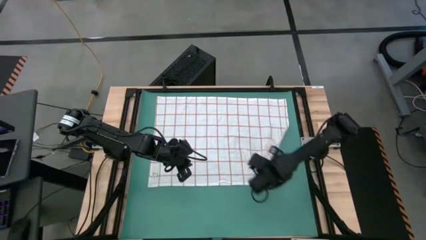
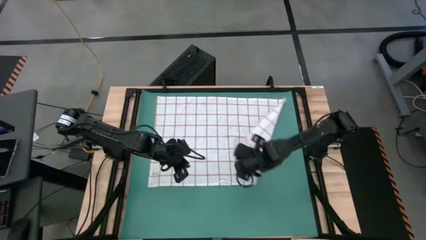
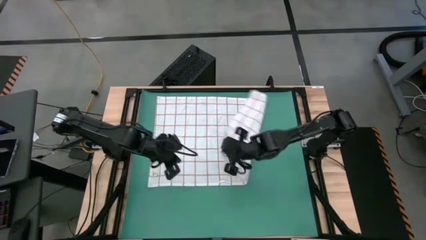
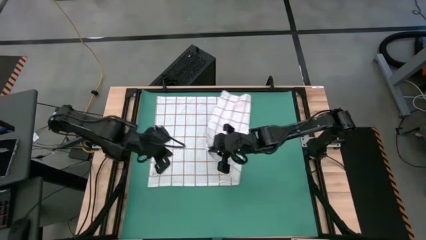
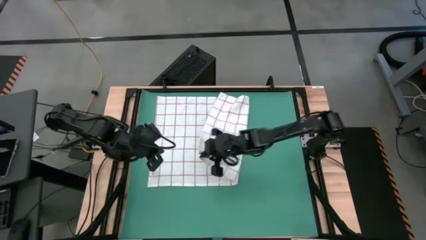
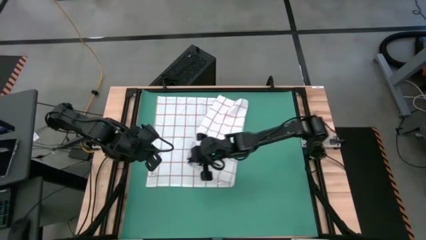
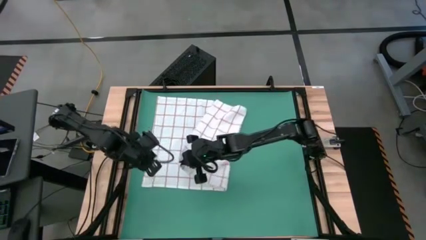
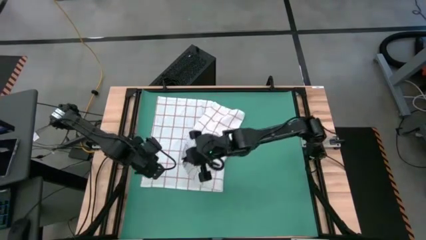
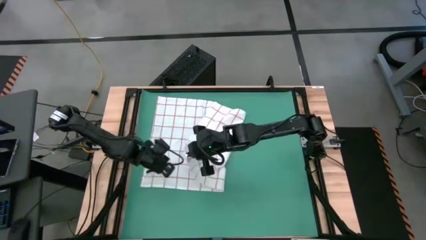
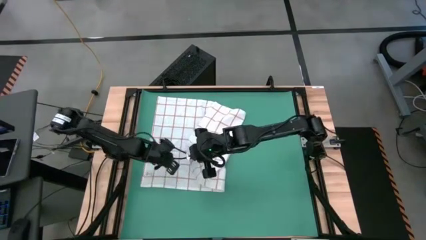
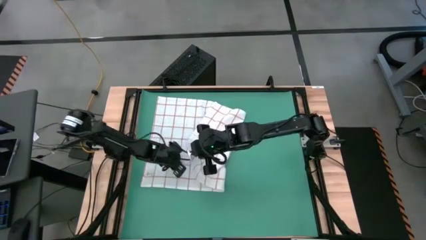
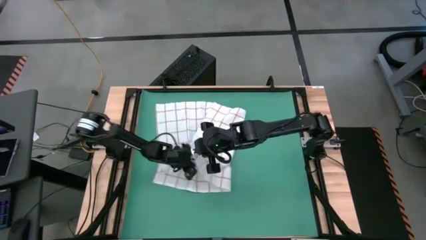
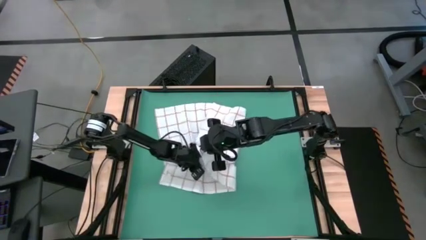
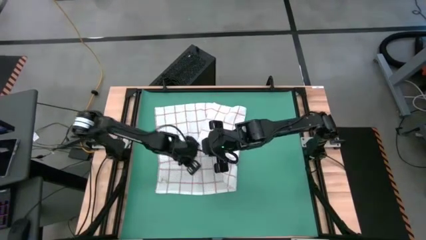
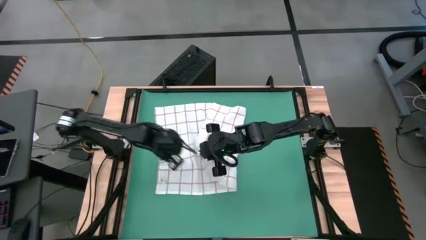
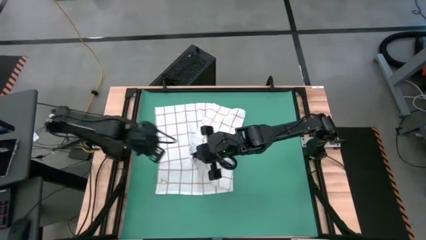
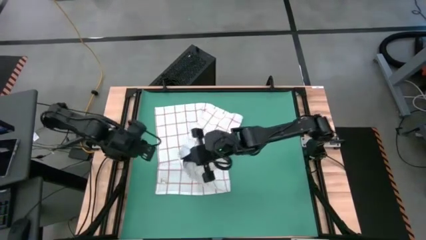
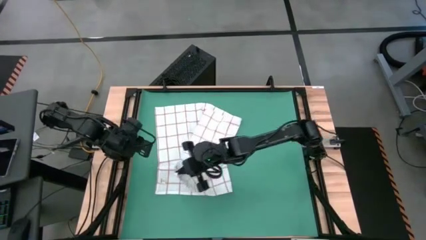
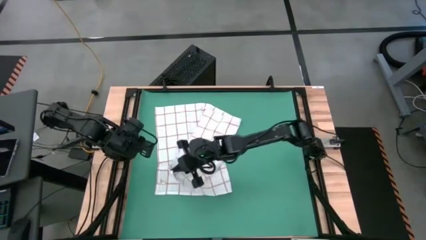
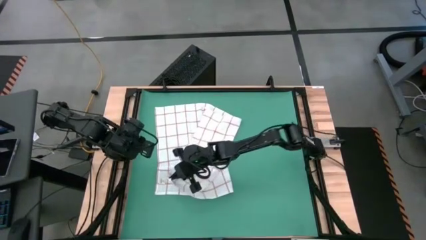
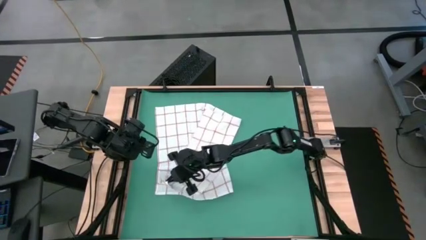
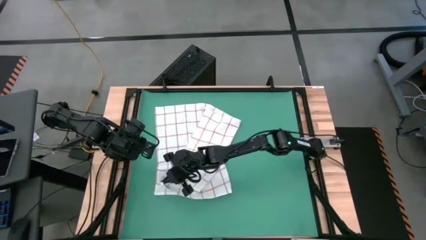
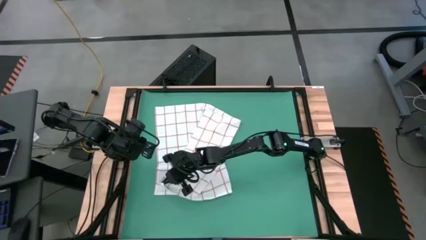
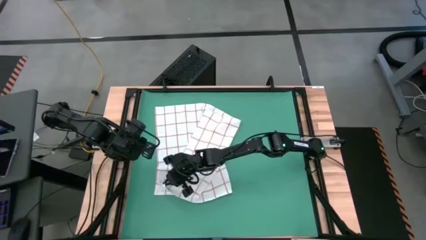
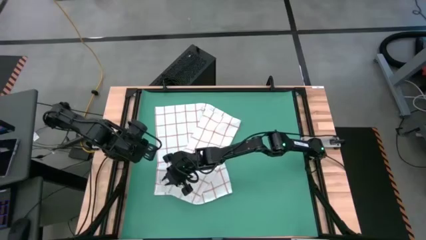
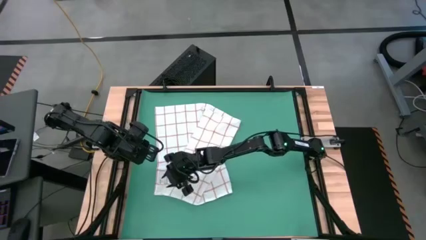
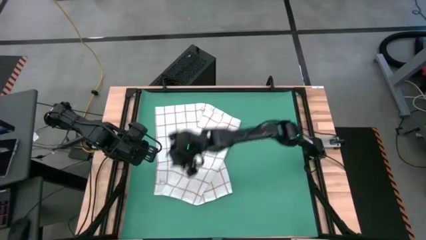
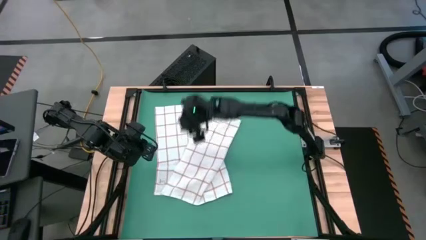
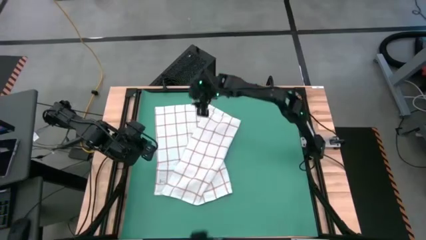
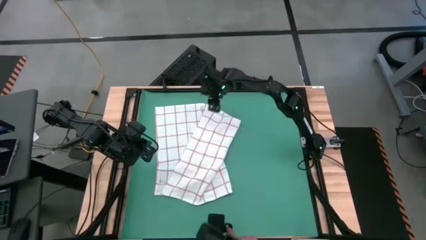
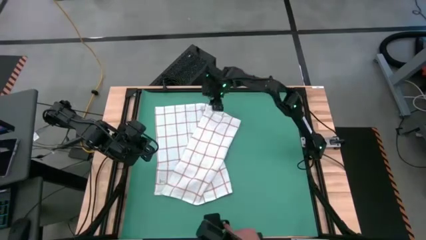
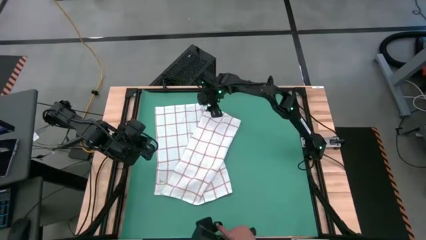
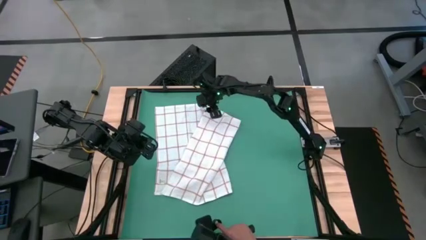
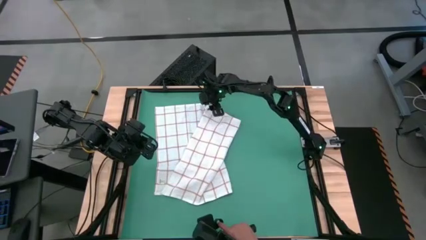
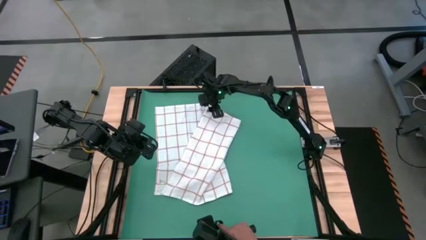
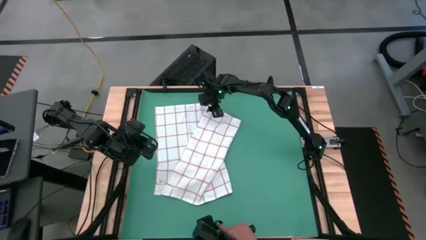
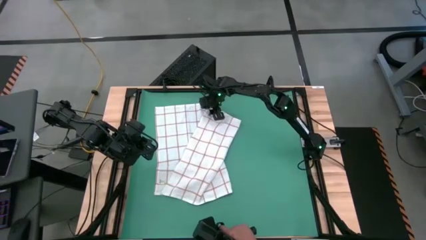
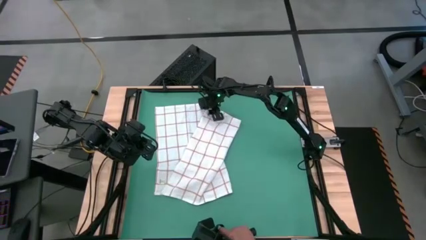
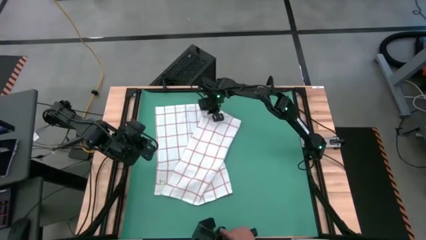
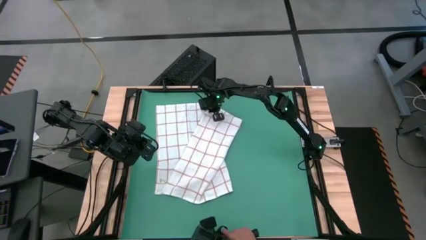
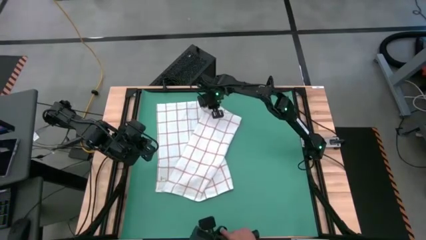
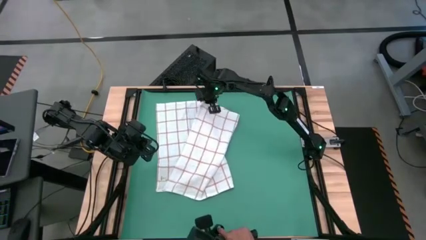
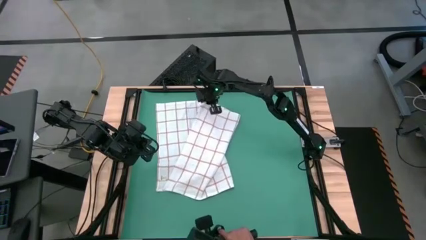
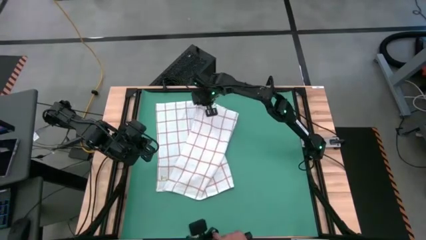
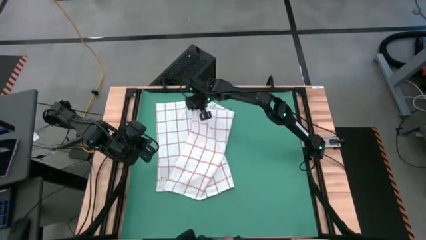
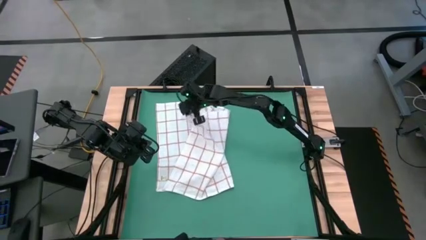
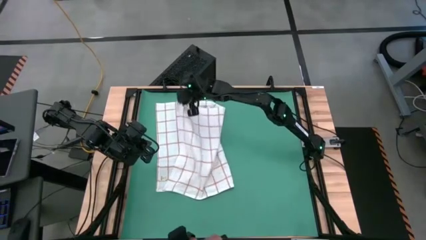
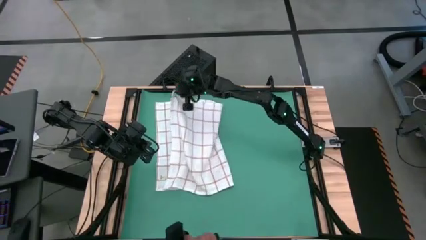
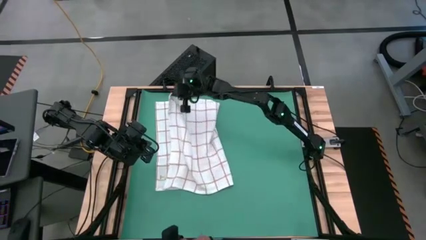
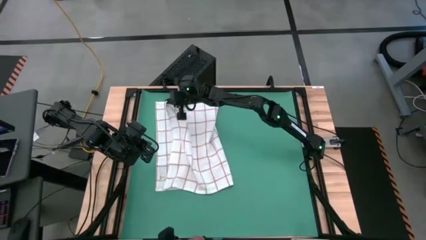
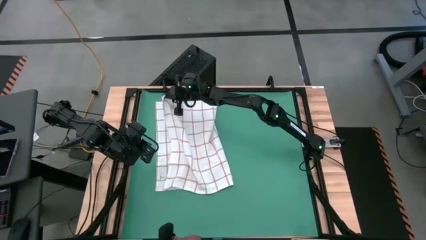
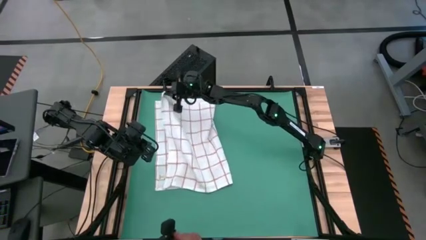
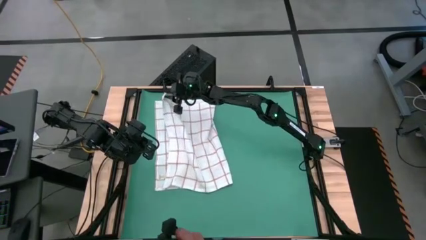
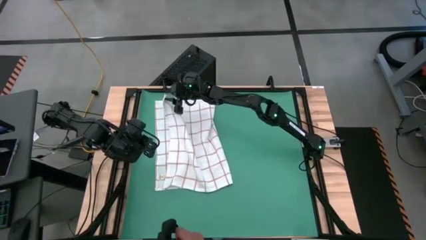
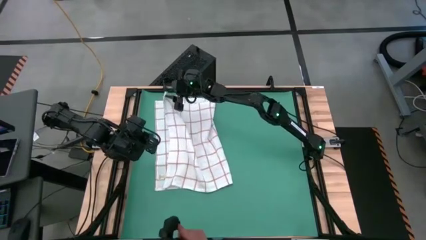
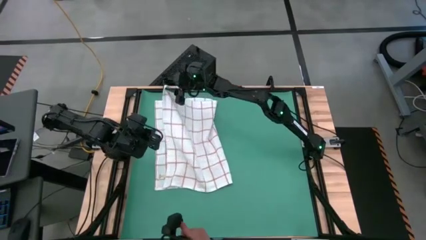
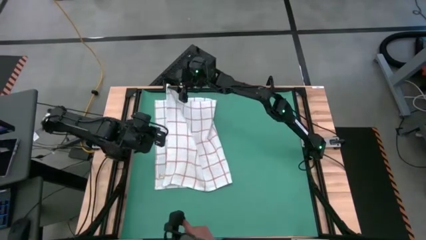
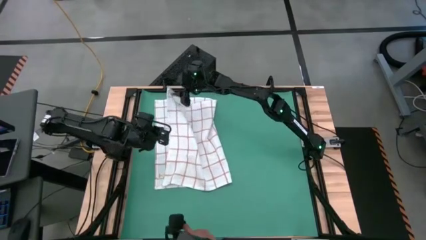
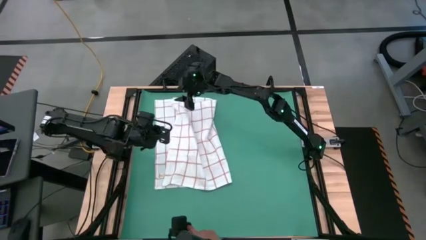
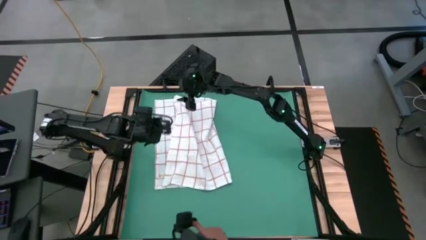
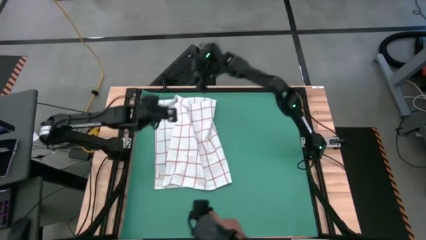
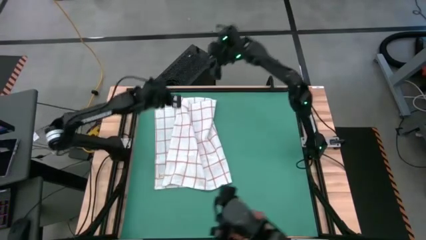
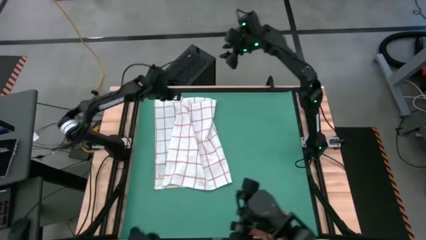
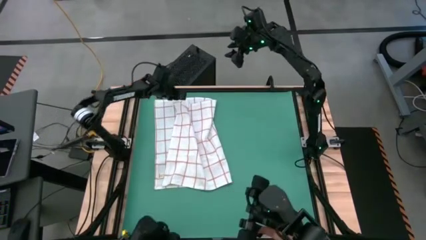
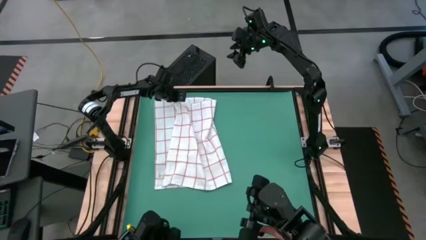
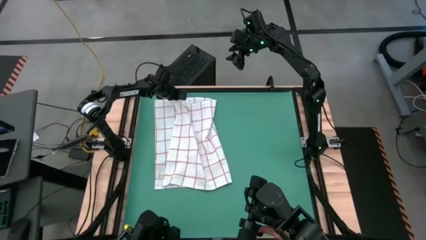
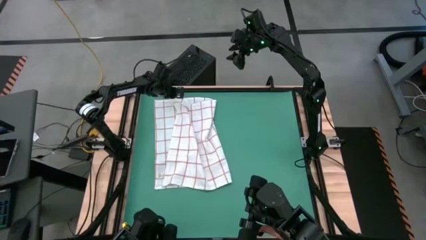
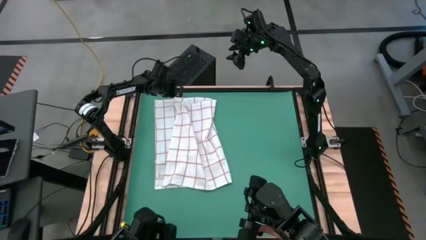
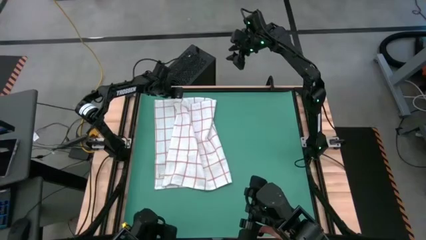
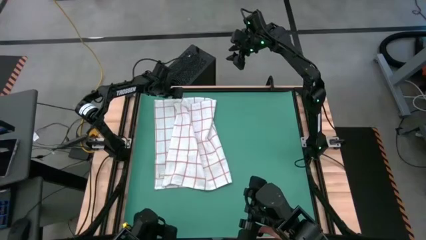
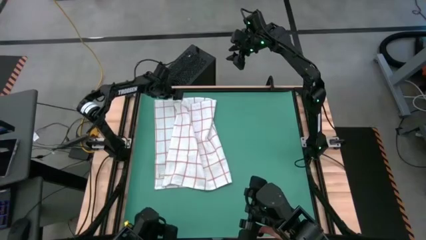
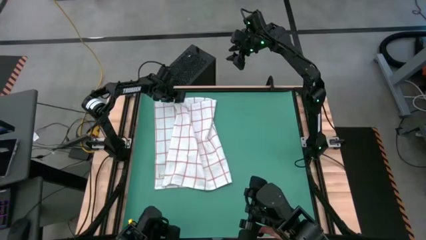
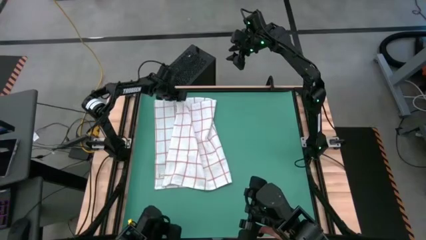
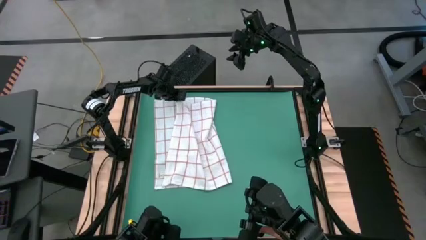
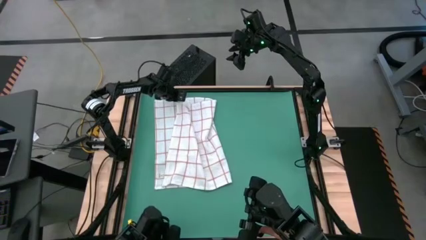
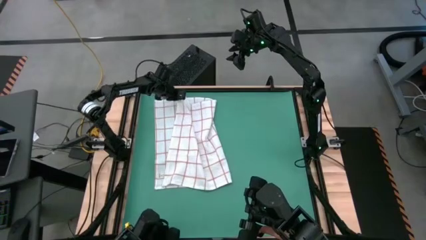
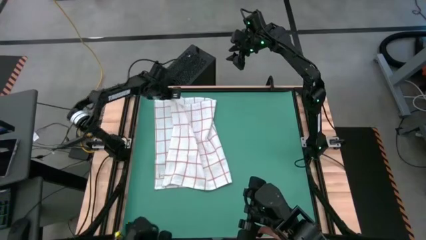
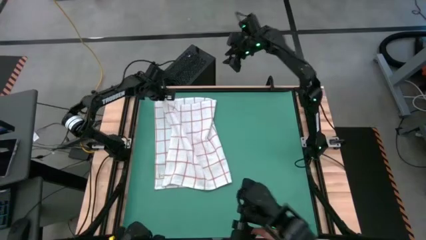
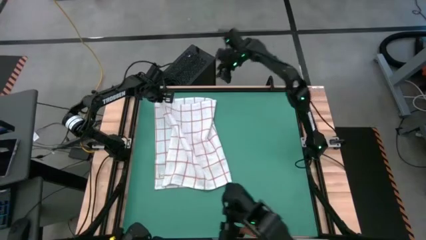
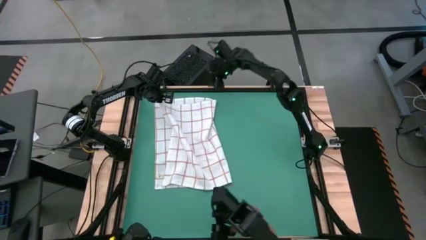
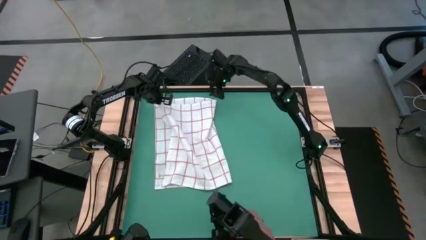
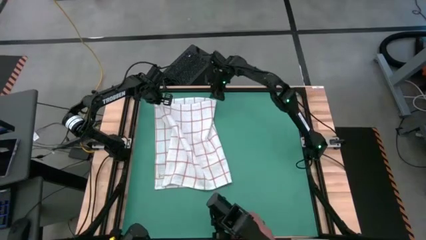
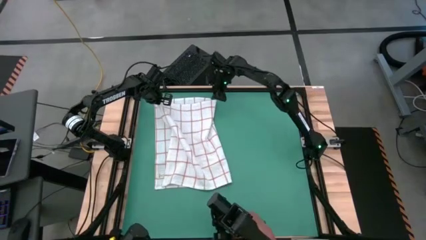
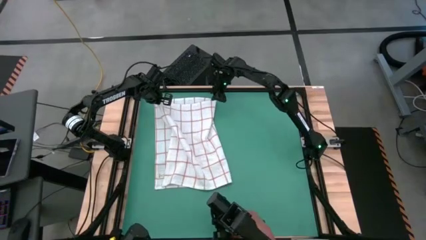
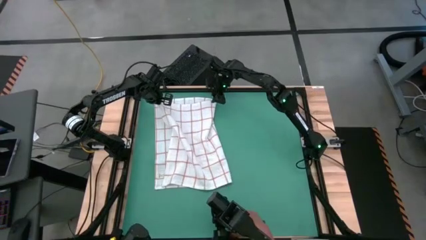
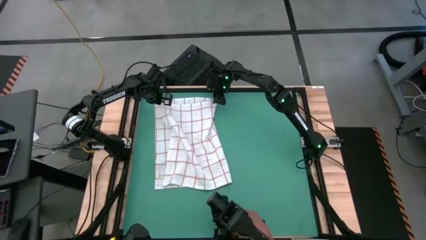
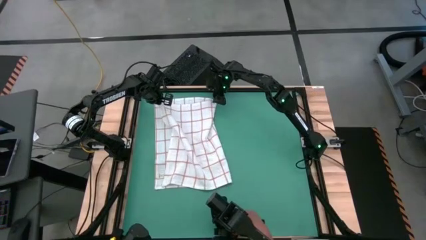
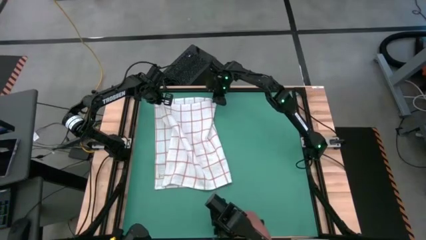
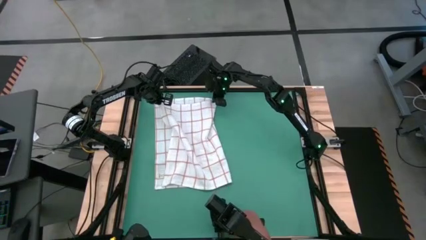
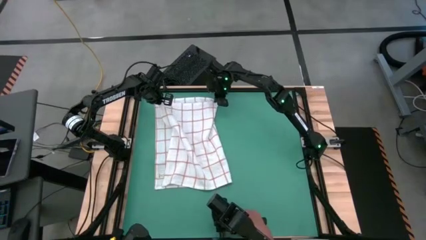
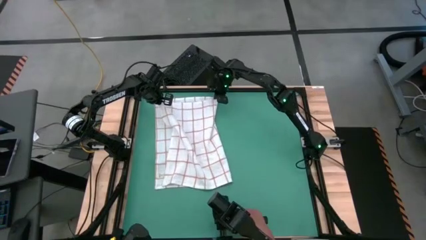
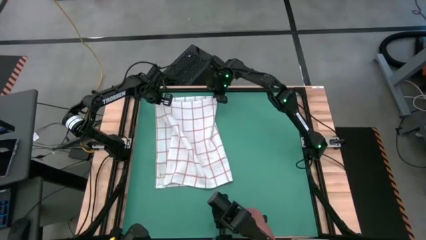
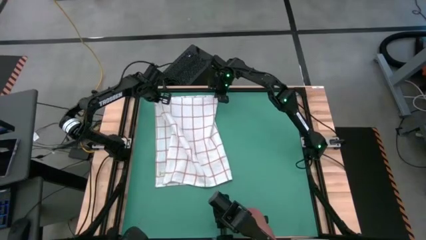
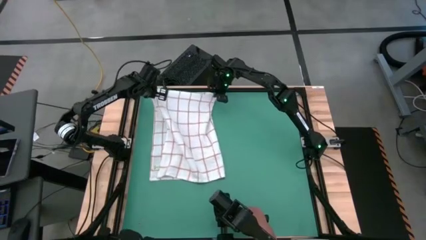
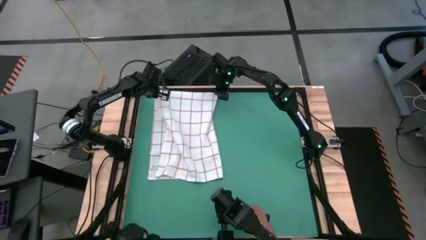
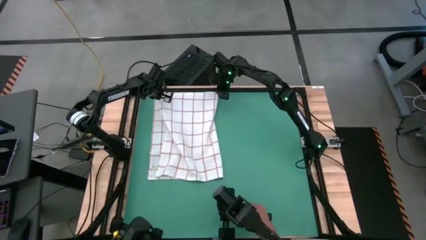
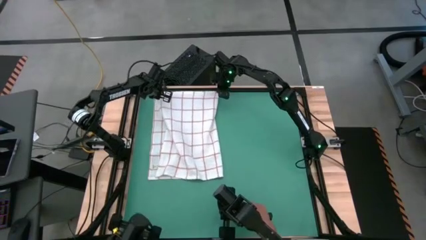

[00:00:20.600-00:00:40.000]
Task: Roll towel into tight, uniform cylinder
Roll the white towel
